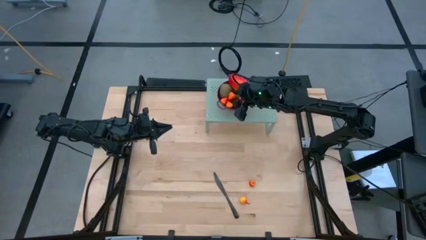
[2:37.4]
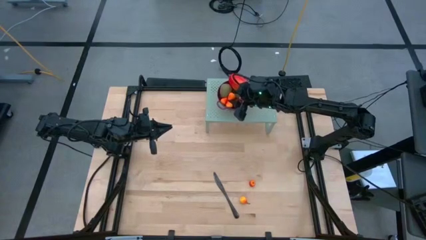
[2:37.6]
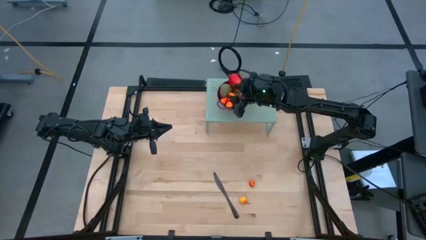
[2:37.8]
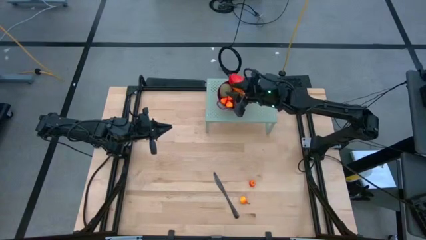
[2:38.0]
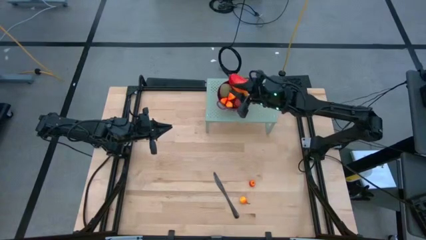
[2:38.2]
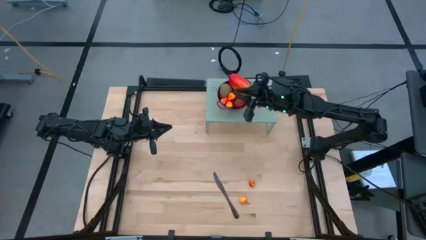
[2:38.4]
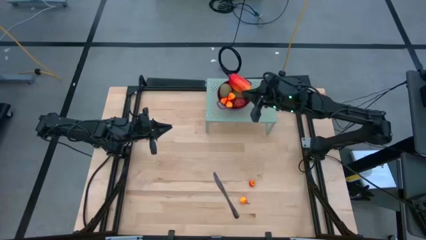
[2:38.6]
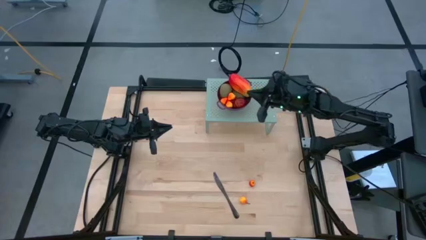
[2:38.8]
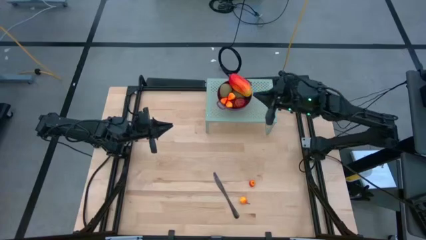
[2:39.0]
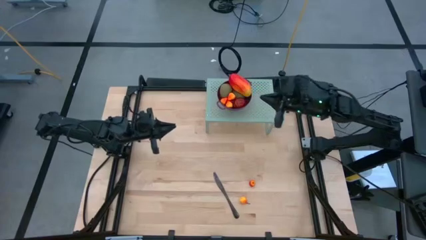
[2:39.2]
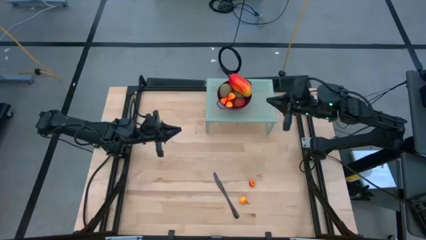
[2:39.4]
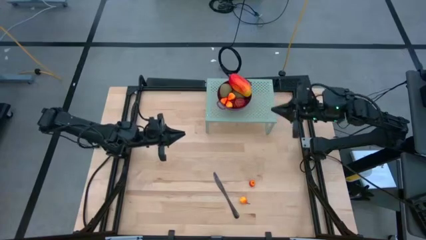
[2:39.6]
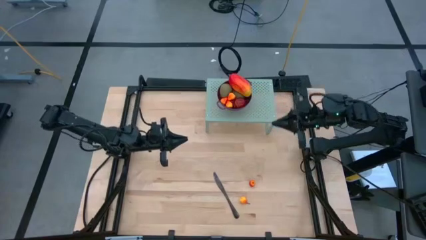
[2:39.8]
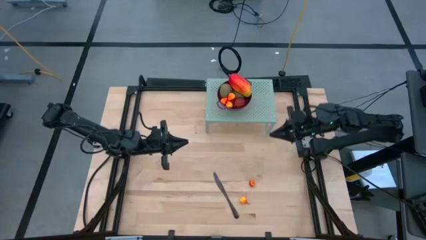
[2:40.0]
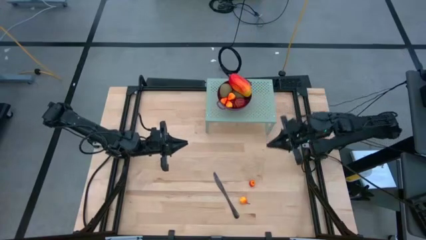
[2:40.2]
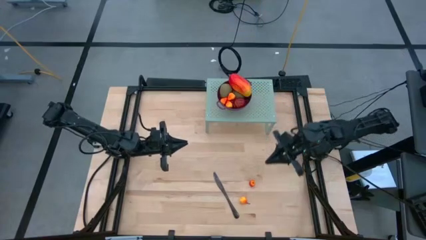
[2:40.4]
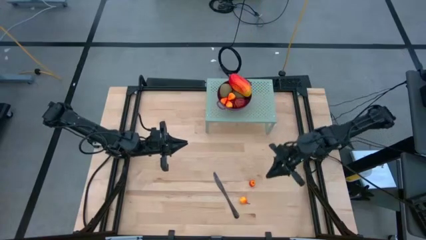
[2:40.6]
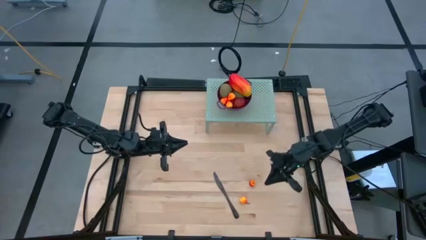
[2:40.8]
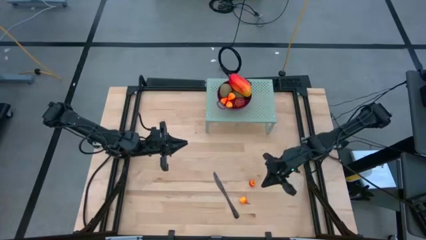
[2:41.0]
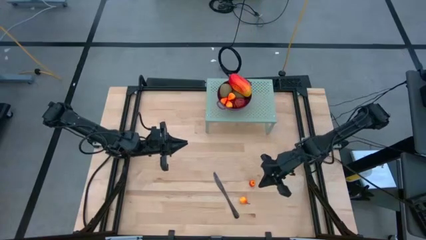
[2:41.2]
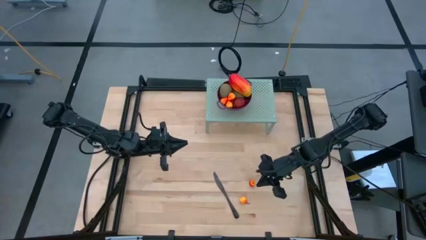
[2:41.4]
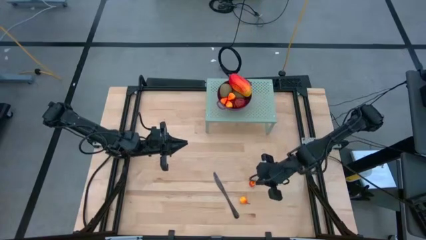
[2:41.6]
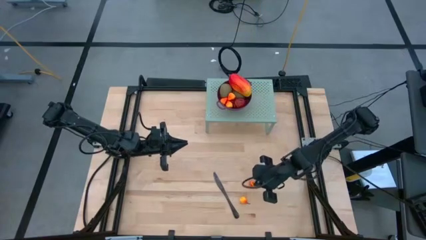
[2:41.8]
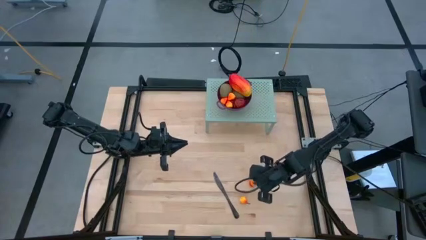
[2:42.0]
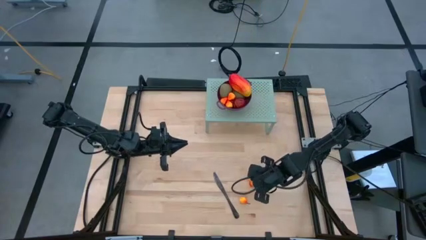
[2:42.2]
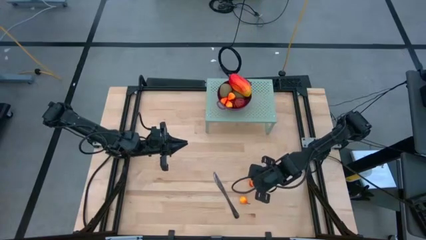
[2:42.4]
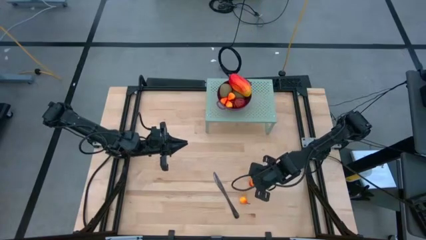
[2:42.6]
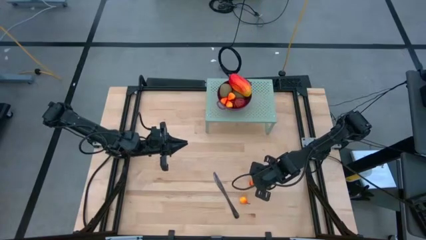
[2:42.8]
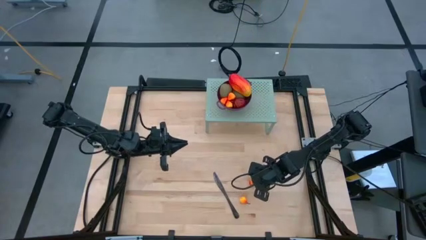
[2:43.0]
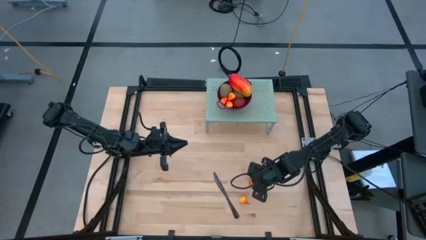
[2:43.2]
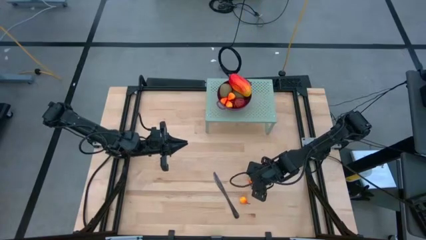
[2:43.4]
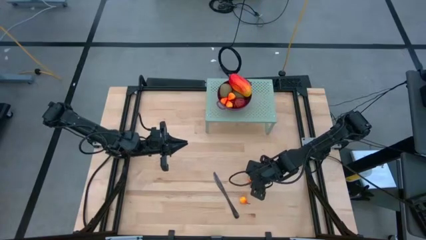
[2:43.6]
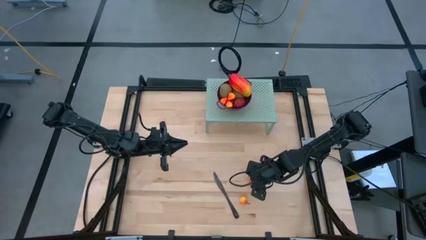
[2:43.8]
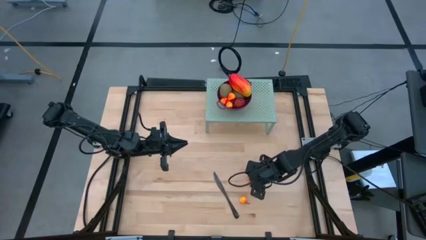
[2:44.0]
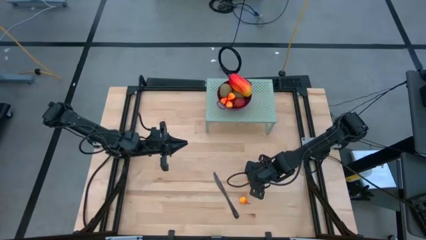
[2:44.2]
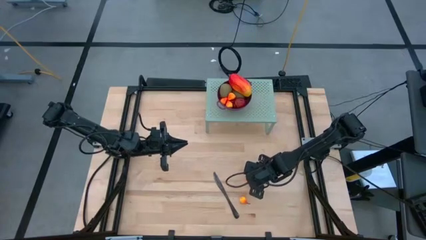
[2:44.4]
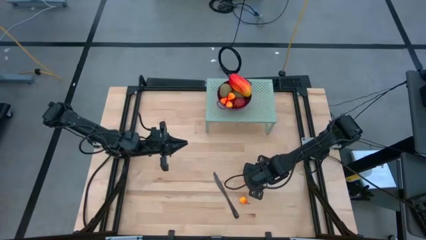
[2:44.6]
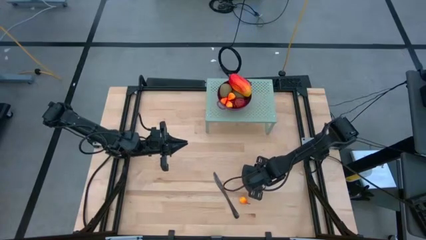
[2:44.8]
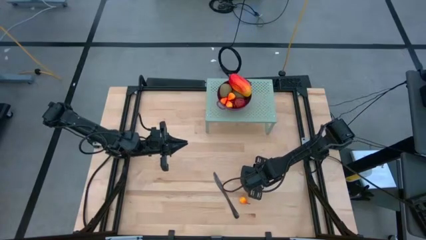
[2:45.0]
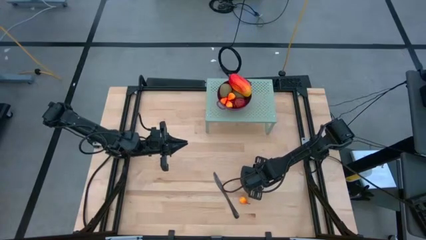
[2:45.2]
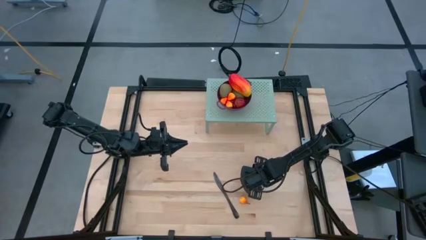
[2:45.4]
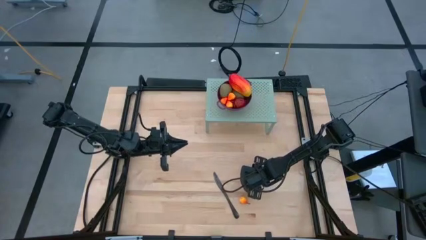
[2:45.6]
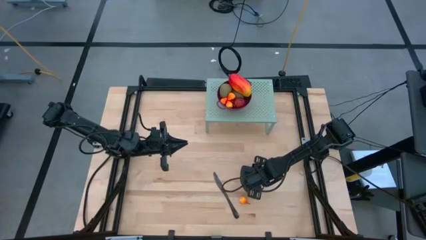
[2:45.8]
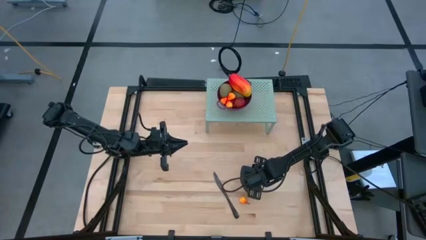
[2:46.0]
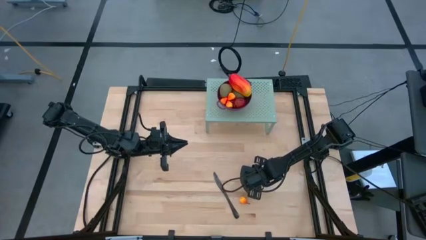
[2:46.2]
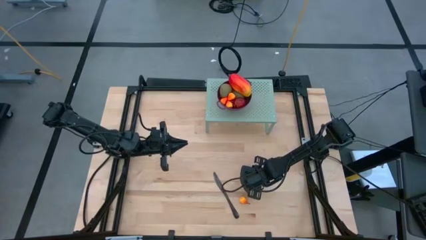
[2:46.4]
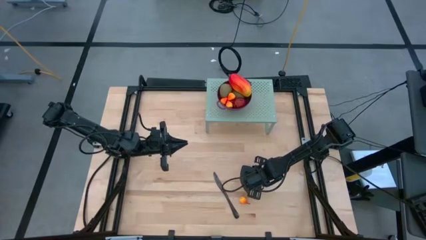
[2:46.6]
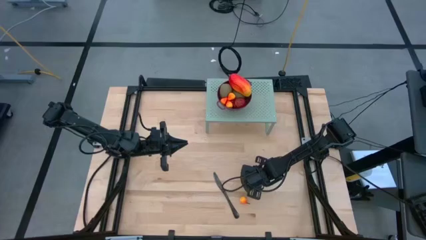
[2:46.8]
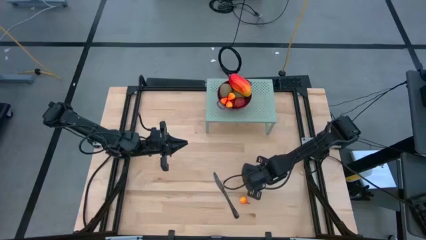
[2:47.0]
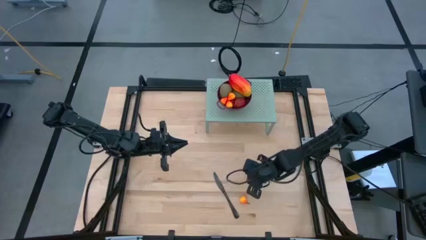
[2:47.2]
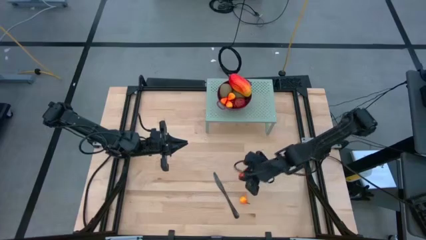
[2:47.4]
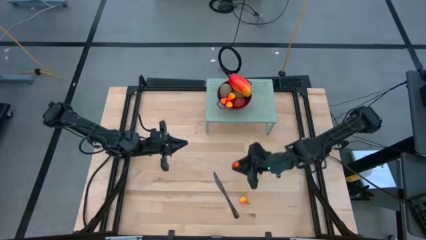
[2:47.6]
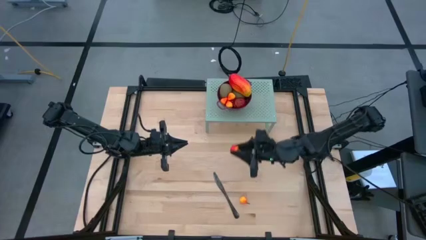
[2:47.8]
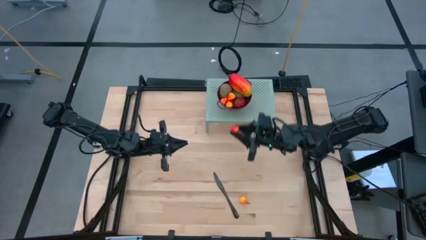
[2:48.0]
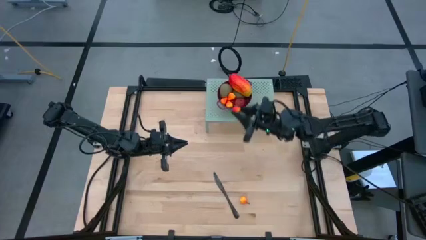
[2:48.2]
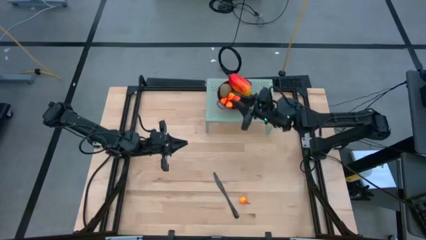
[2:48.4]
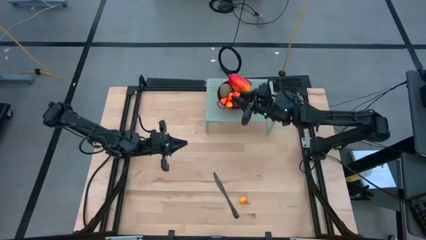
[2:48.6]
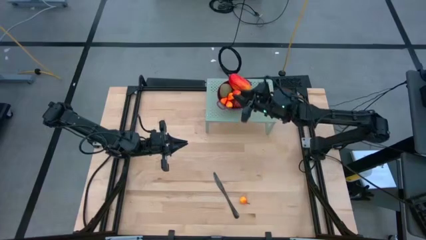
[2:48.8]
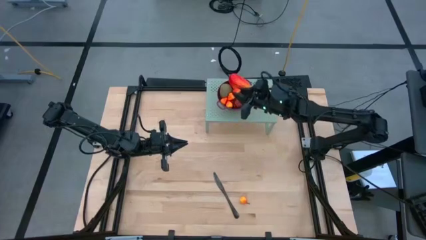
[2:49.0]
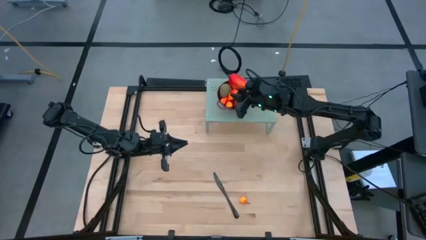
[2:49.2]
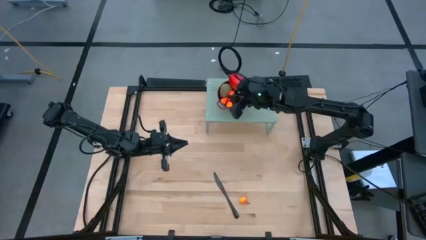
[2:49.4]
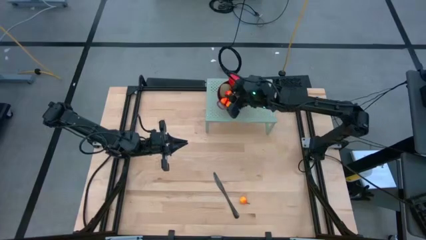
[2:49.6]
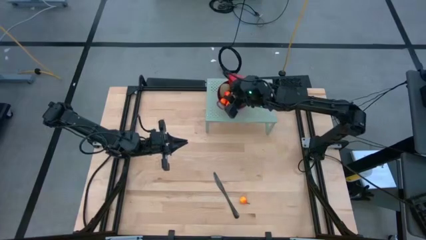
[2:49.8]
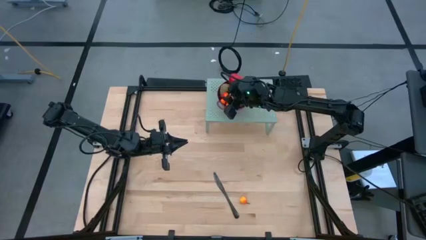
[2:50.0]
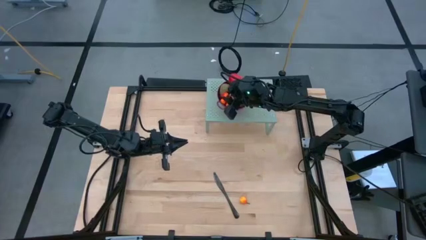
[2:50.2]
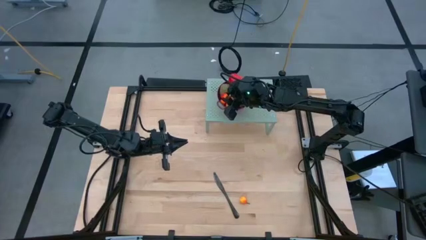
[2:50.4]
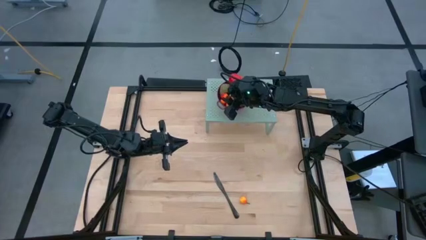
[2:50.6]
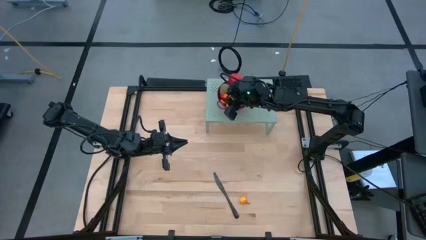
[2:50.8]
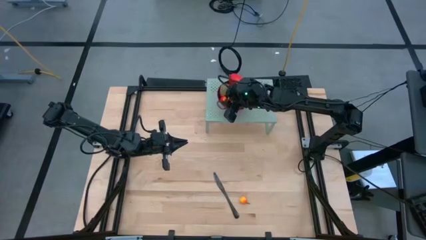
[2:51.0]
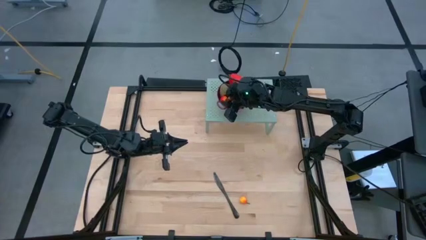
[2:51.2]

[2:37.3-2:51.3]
Task: Pick & Place Fruit
Put the orange pear into the violet strainer bowl on the shelf

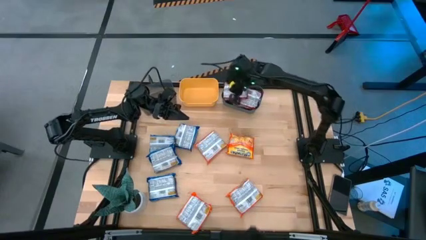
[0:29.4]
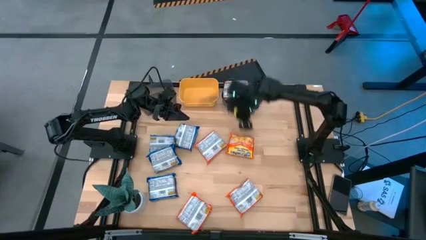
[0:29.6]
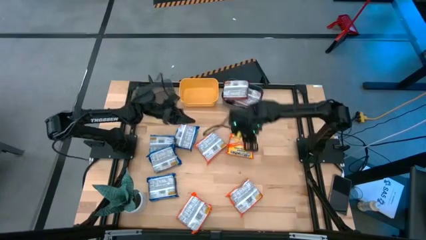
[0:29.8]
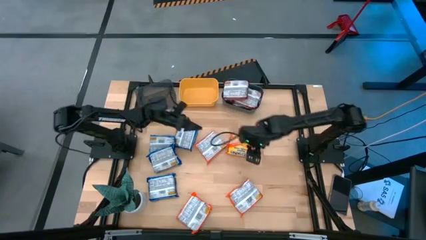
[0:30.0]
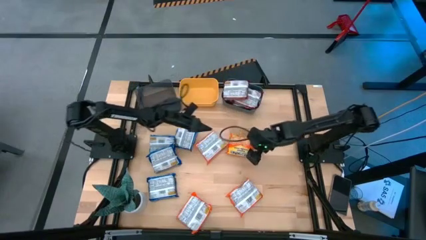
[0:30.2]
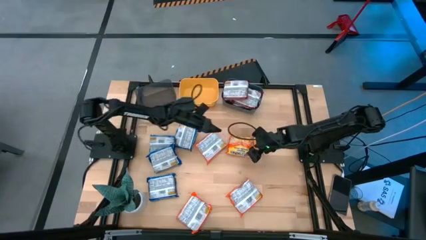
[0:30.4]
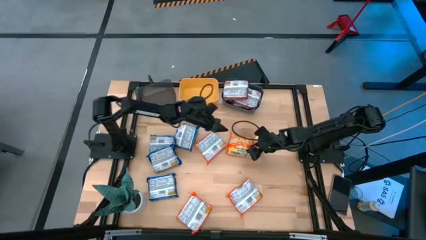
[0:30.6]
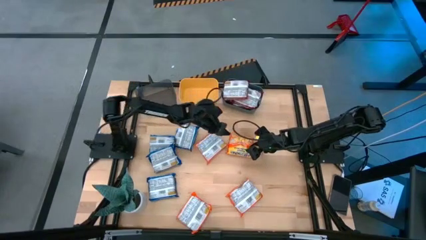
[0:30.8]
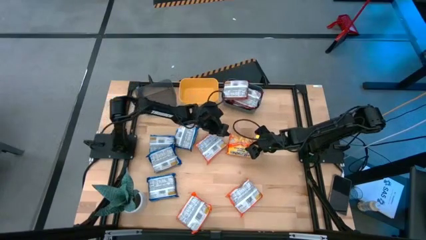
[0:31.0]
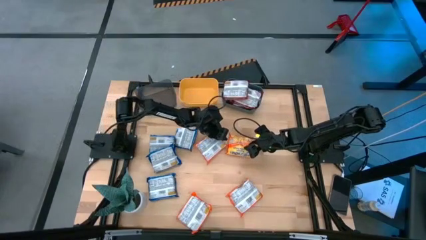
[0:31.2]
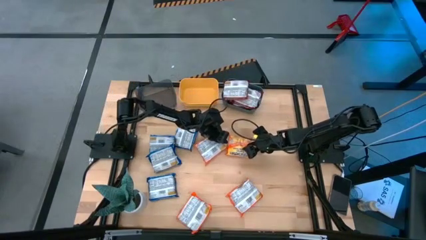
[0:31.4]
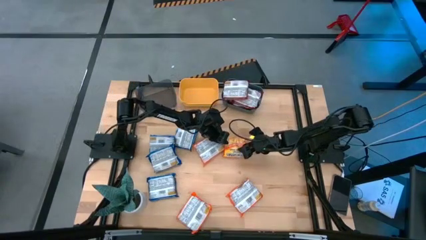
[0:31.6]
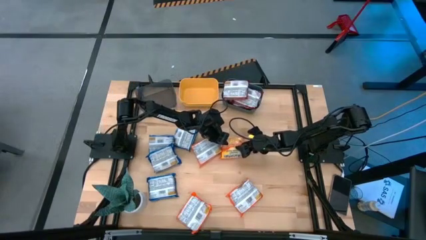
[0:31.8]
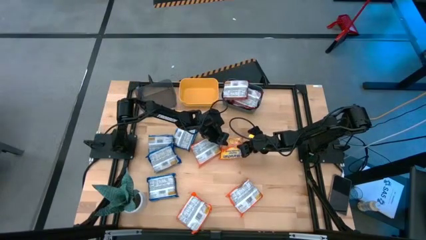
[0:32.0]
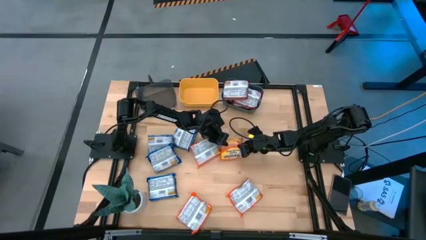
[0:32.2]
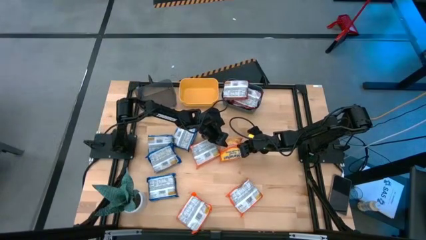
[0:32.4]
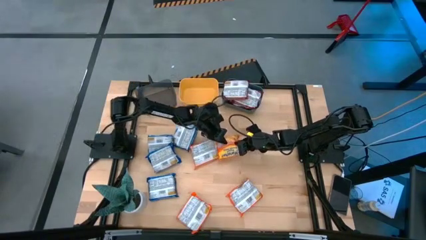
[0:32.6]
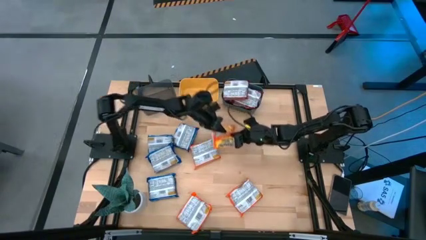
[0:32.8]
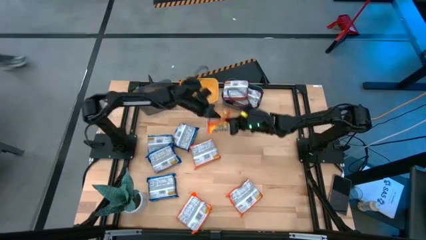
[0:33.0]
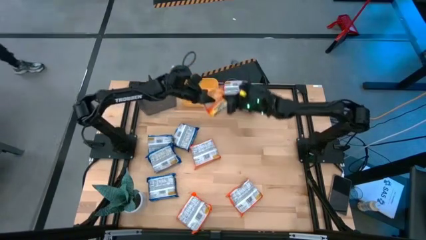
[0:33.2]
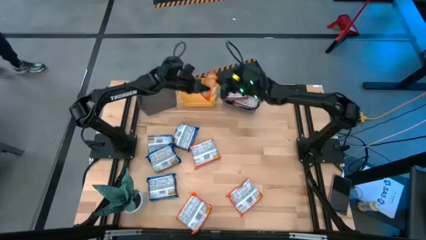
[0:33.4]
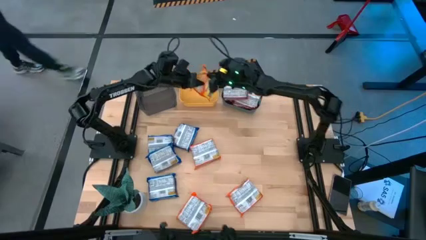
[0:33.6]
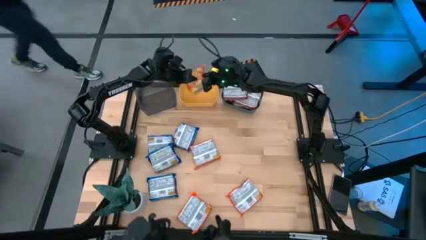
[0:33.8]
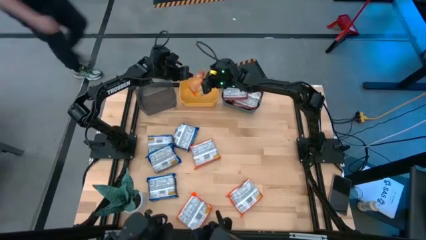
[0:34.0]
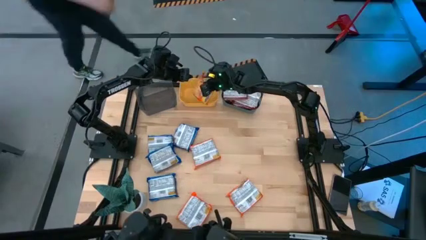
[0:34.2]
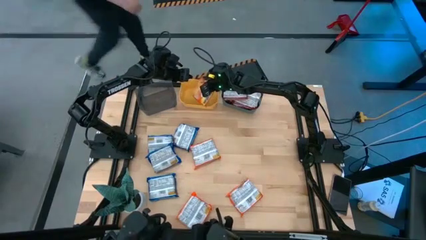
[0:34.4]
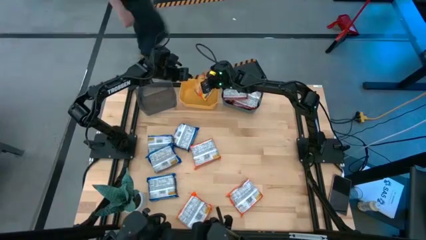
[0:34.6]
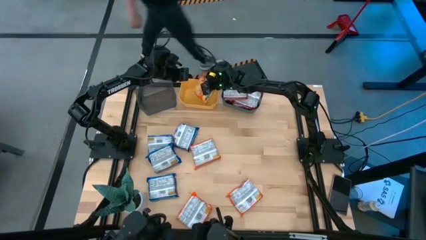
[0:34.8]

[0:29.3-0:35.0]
Task: Sort Maruchan noodles
Put the orange noodle pack into the yellow bin
